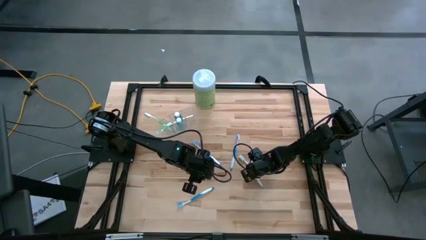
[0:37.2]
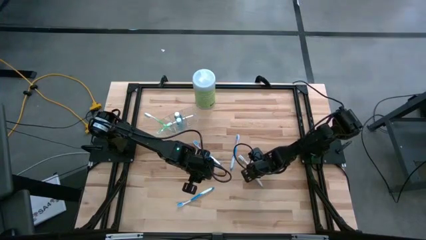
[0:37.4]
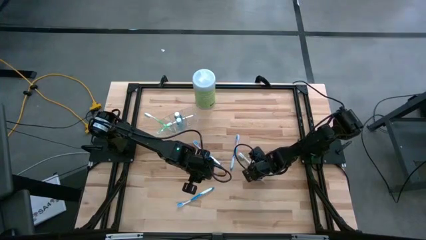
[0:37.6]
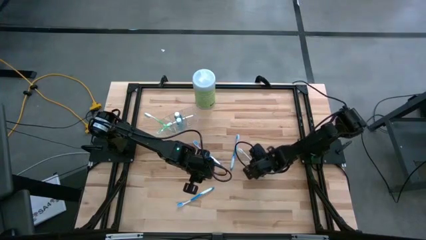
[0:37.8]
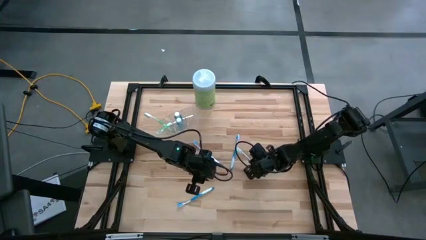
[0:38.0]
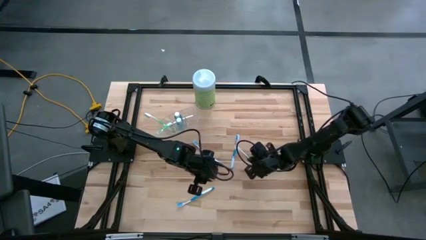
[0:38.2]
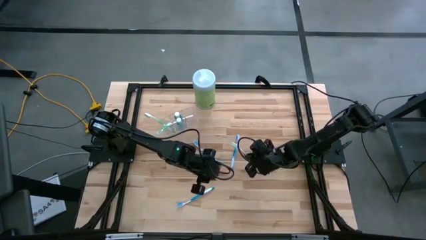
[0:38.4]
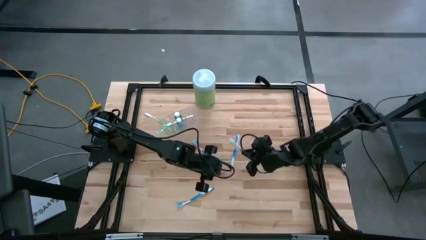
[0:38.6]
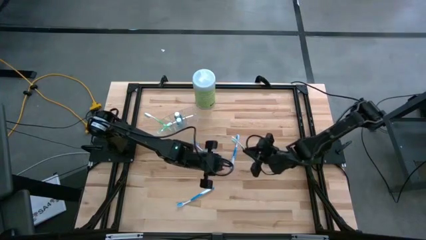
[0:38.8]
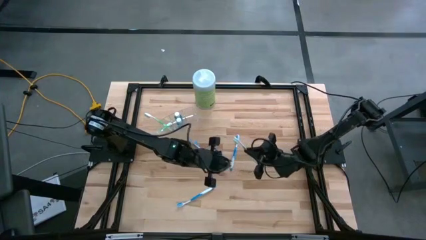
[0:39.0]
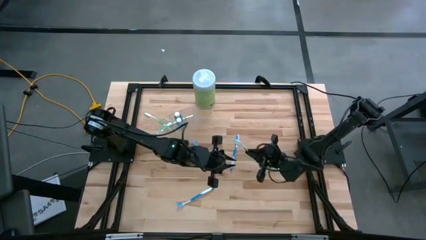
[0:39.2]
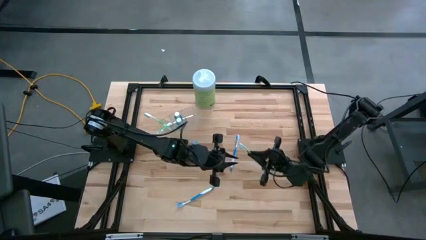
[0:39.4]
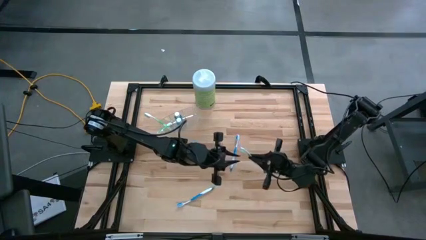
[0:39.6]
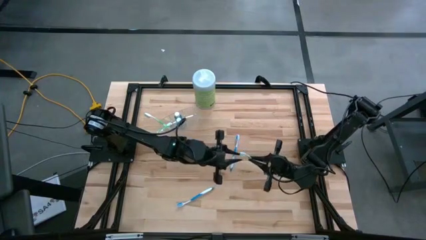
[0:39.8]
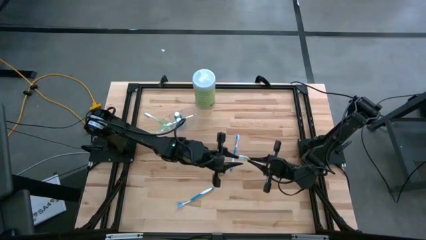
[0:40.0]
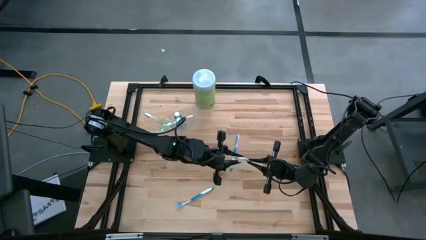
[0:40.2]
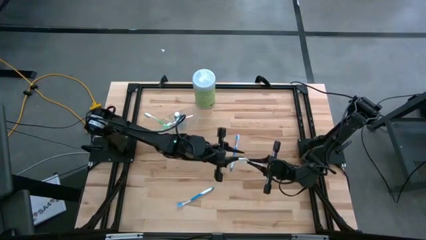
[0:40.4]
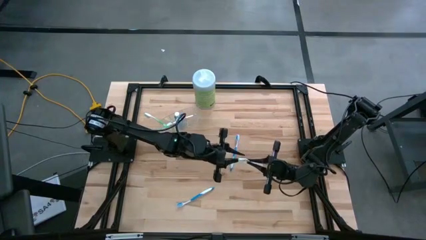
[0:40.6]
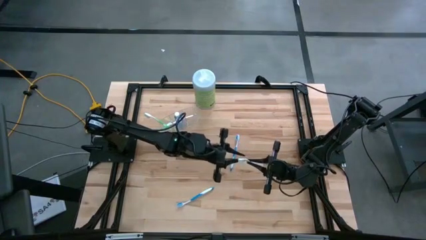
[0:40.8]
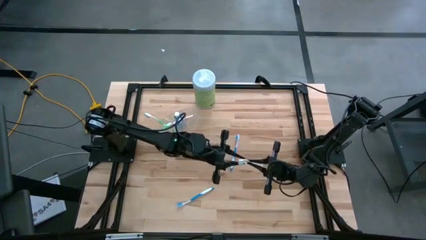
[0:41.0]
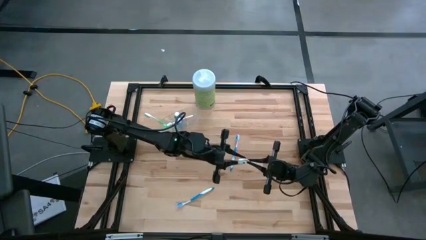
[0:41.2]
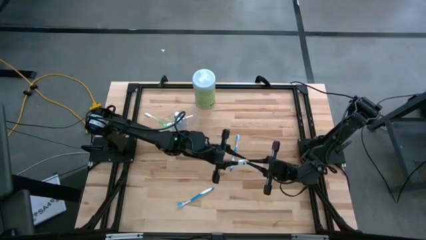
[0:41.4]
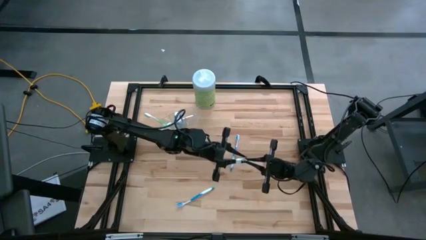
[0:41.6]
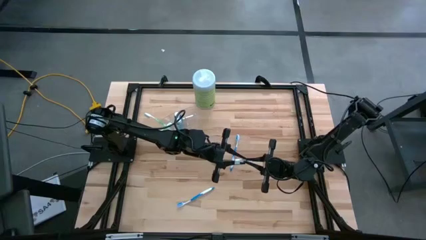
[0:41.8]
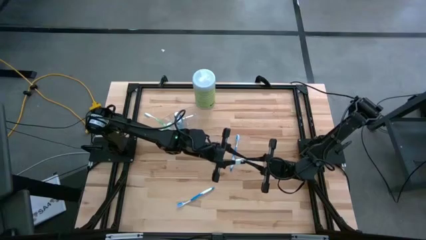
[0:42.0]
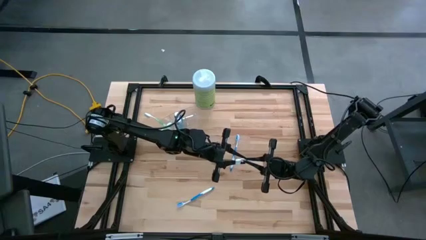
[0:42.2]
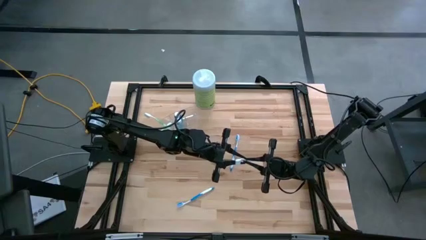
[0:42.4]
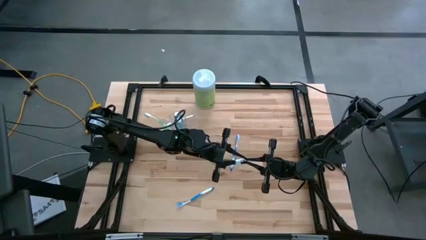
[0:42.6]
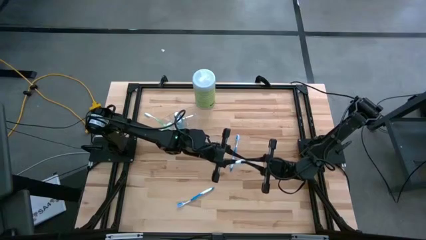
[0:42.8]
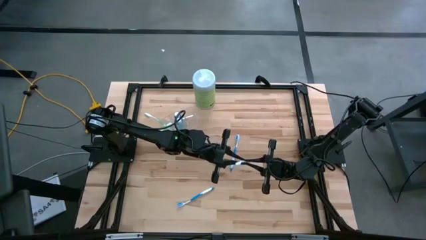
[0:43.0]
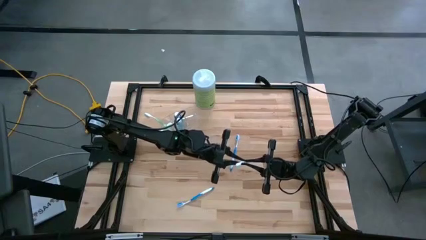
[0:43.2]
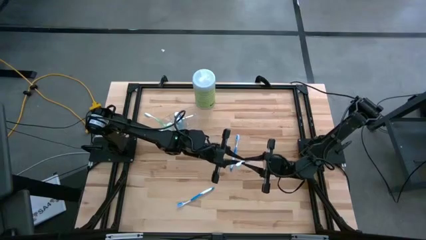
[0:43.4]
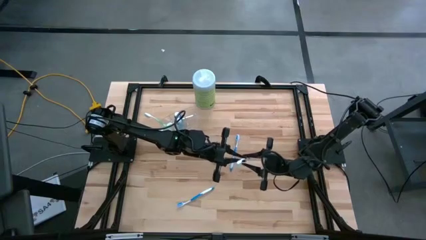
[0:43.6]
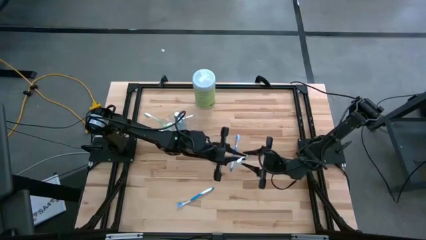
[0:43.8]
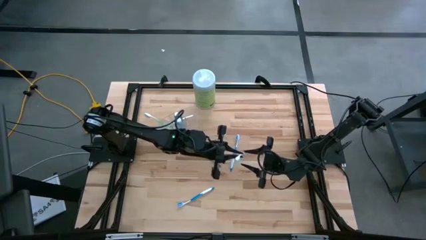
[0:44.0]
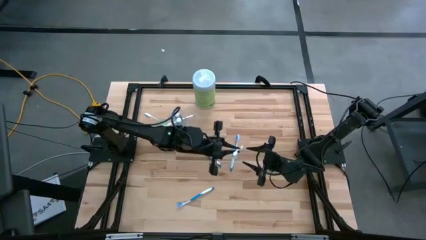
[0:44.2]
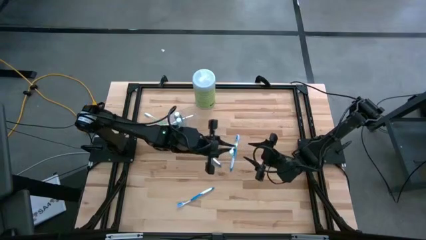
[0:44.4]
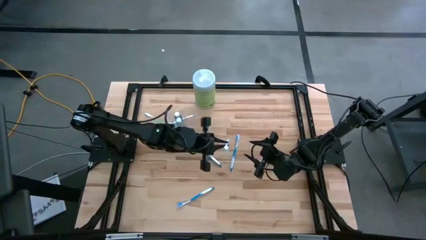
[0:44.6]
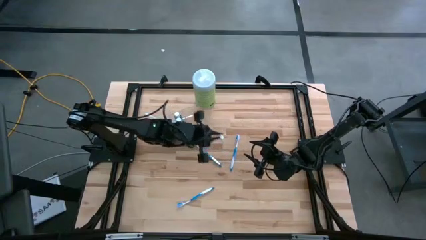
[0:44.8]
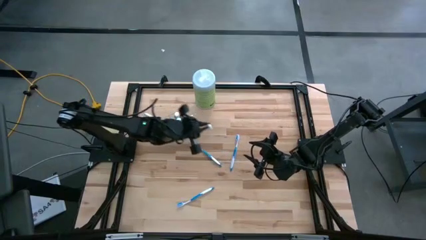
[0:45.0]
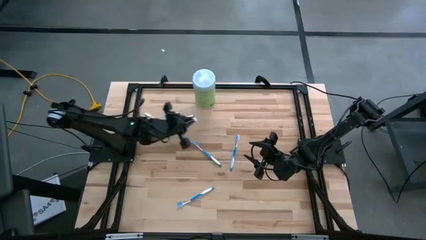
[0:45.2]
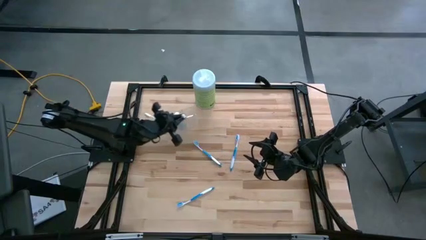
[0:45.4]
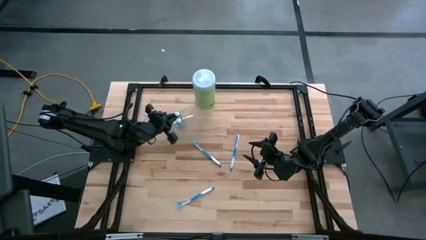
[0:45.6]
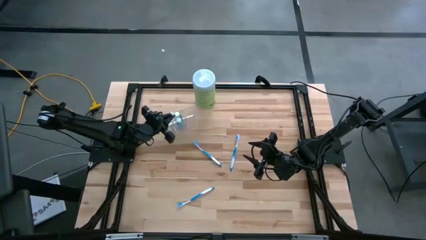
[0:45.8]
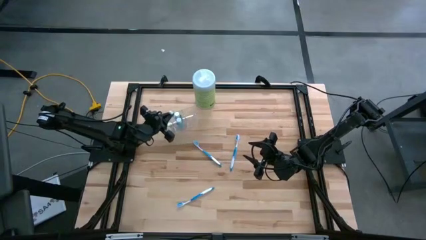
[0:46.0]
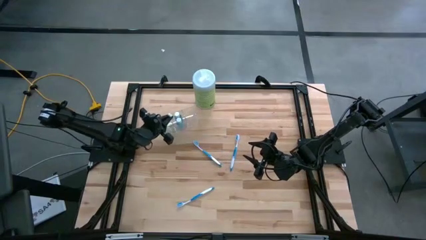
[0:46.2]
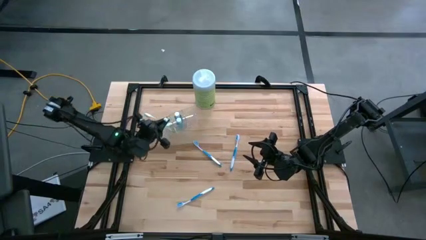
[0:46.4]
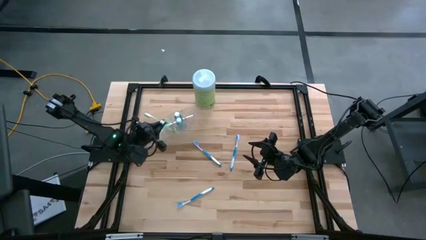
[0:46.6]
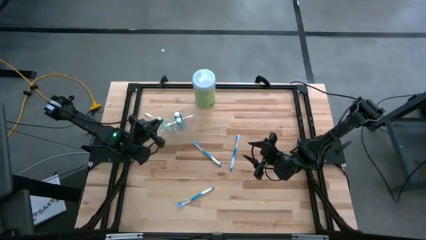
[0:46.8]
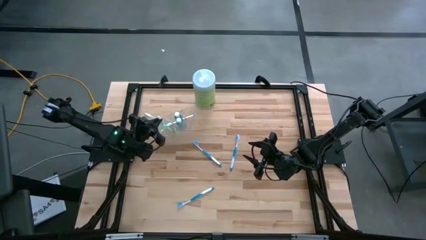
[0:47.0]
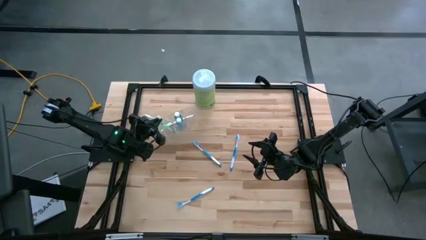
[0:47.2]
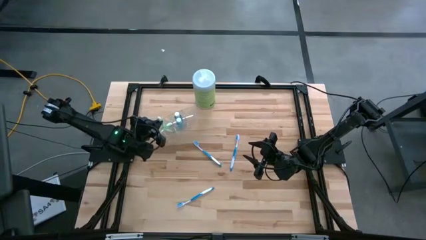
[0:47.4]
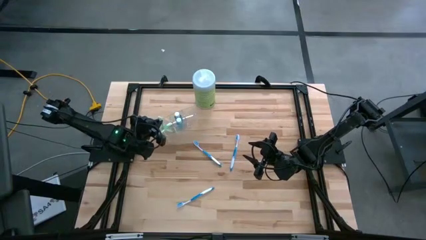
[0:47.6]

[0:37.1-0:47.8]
Task: Pick & Place toothbrushing station
Put the green toothbrush into the transparent organizer

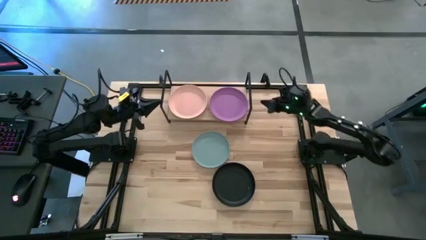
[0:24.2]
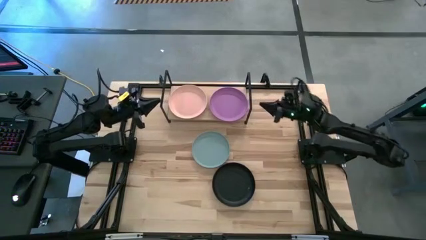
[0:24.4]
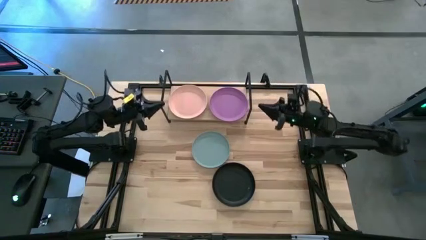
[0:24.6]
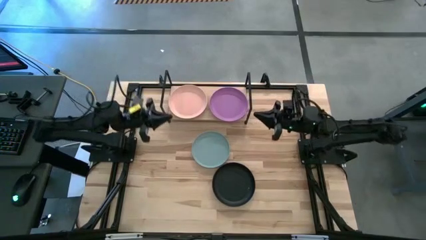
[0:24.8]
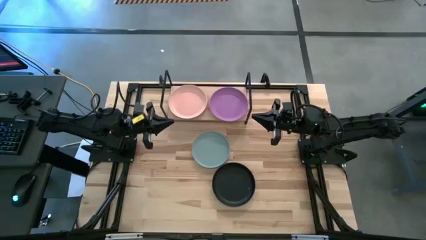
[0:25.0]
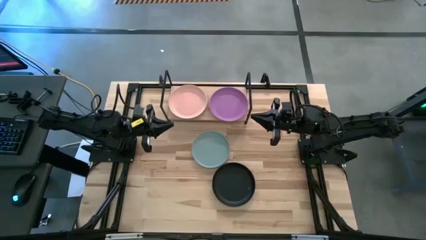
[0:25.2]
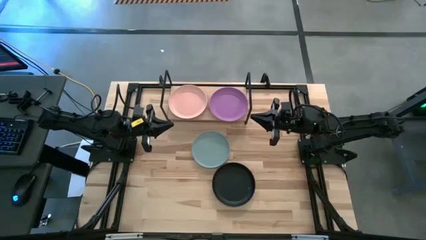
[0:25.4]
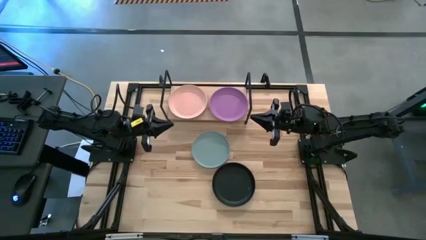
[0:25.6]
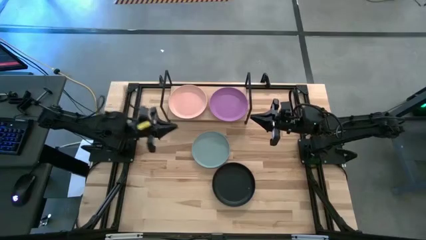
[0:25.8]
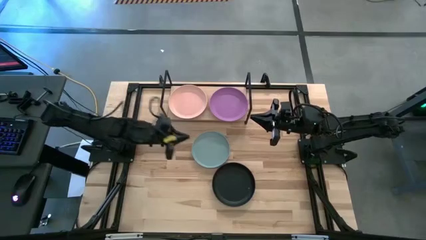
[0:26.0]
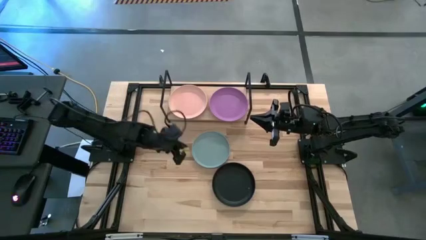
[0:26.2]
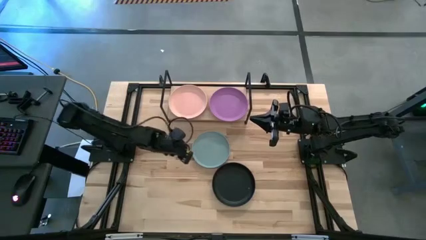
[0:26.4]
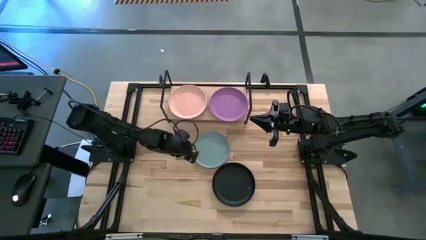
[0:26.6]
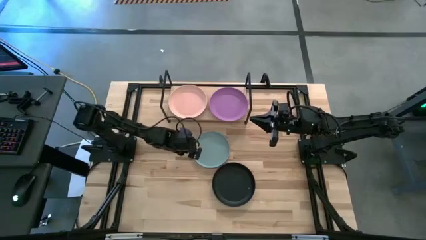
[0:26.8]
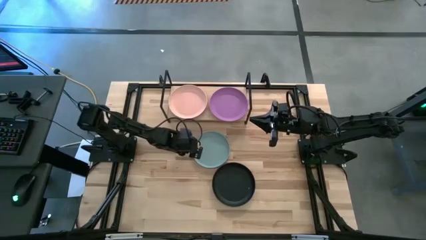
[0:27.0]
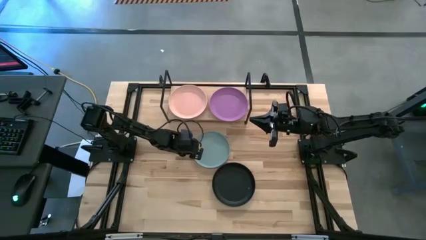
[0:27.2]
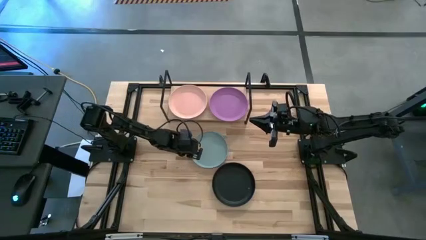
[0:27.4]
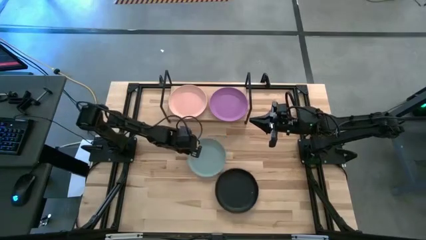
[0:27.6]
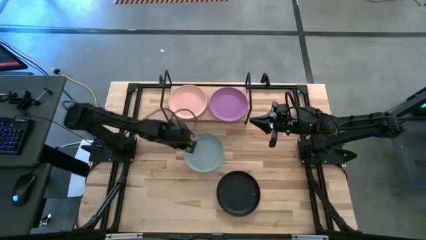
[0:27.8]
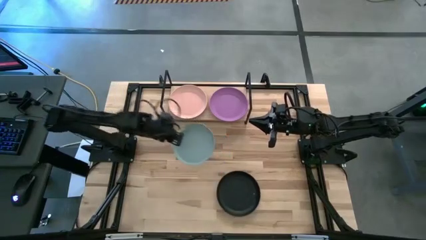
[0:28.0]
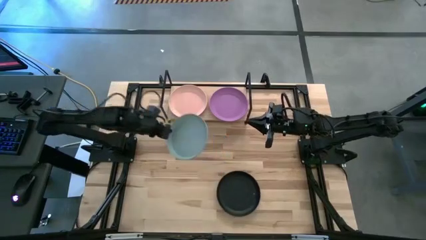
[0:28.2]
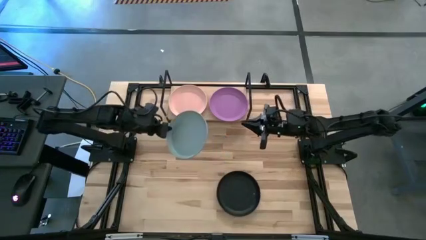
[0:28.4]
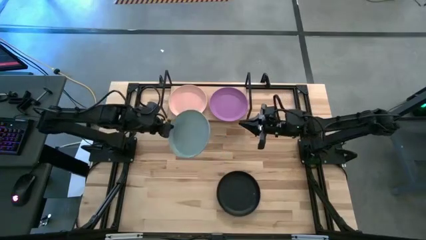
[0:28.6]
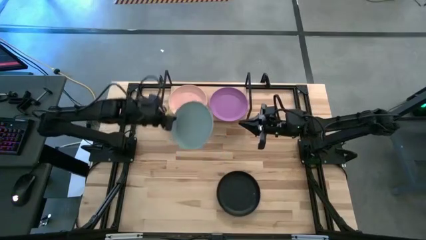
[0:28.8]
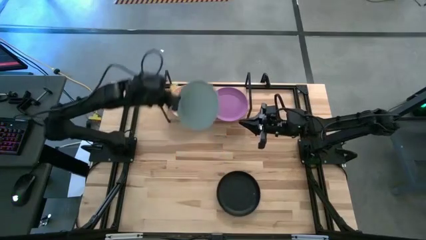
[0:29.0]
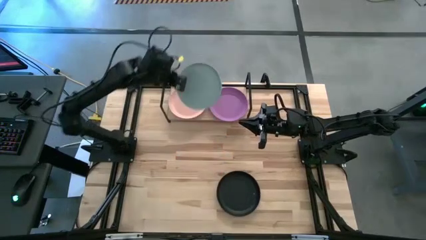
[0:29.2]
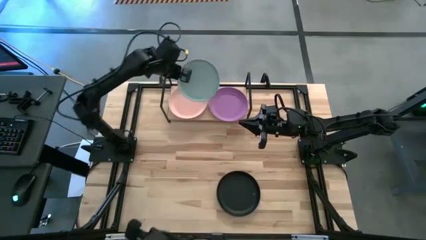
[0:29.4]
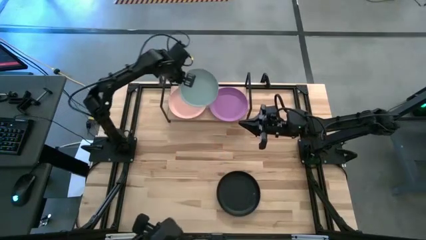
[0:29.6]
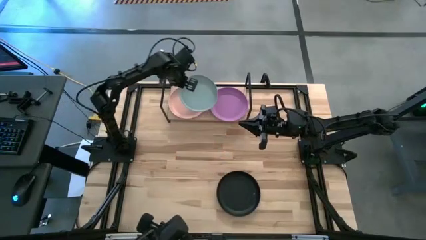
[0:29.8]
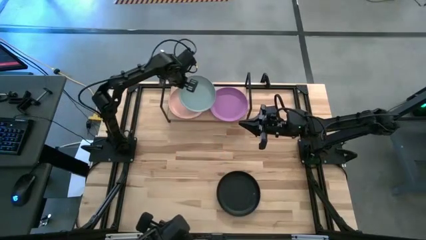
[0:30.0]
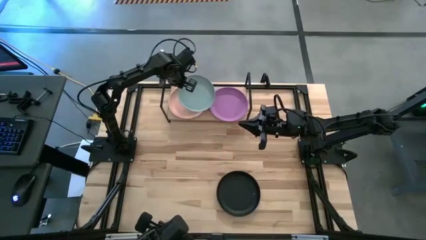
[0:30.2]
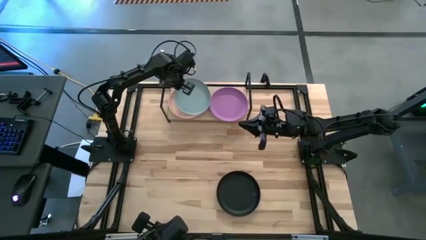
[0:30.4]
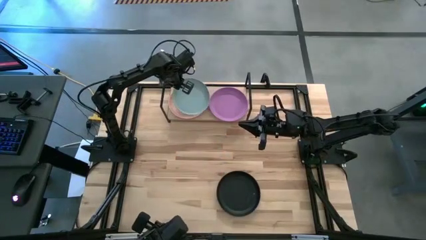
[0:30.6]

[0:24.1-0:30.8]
Task: Place and stack plates onto a shelf
Stack the light blue plate on top of the light orange plate on the shelf
